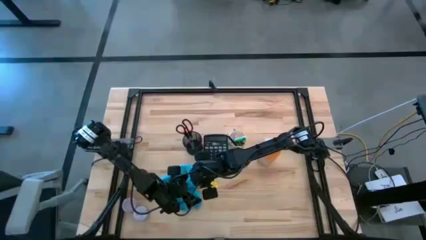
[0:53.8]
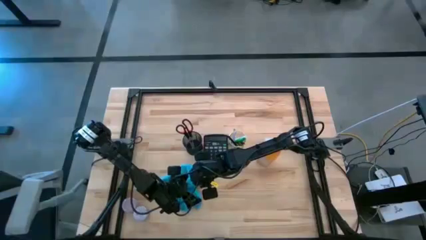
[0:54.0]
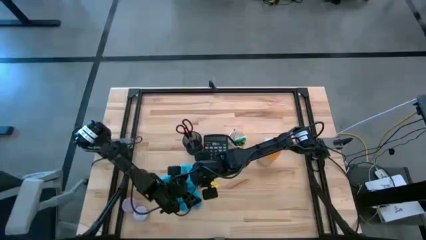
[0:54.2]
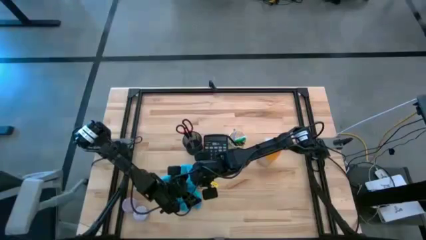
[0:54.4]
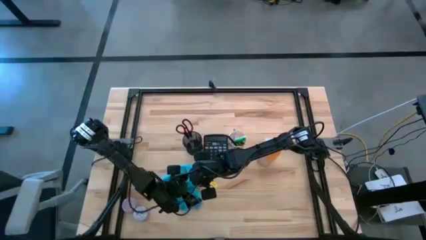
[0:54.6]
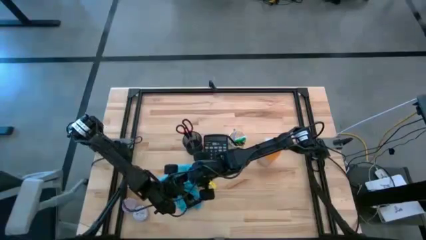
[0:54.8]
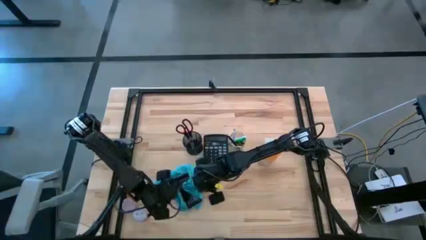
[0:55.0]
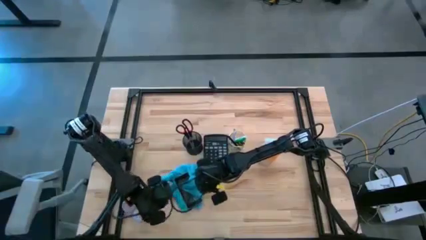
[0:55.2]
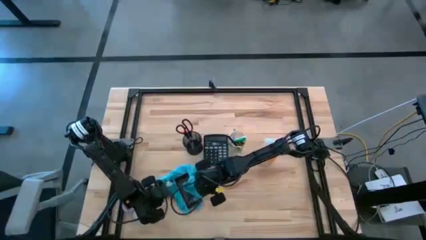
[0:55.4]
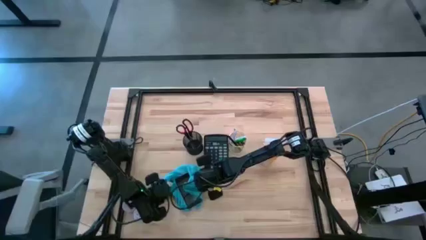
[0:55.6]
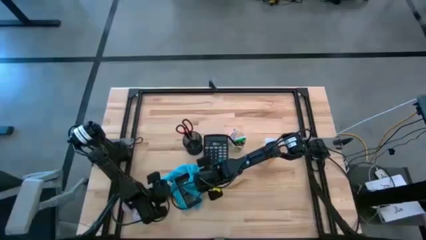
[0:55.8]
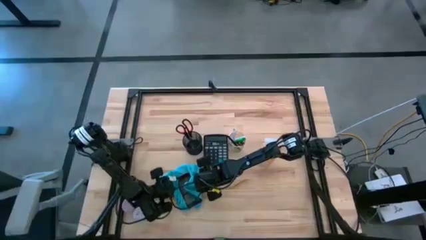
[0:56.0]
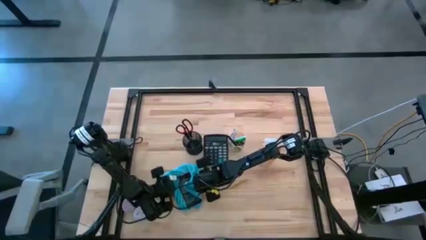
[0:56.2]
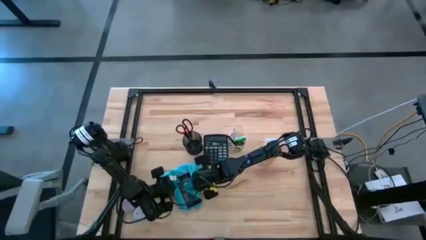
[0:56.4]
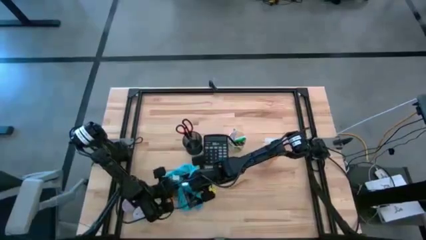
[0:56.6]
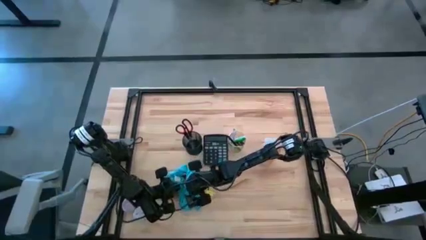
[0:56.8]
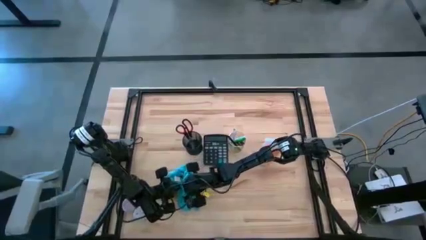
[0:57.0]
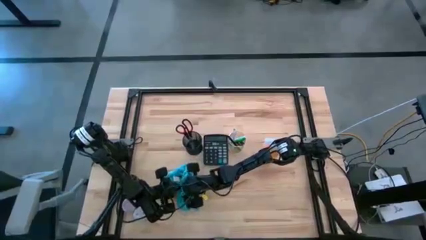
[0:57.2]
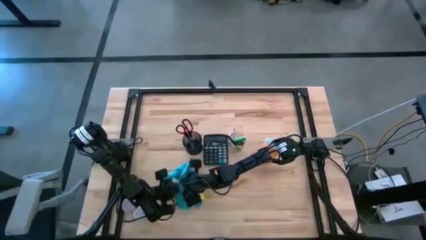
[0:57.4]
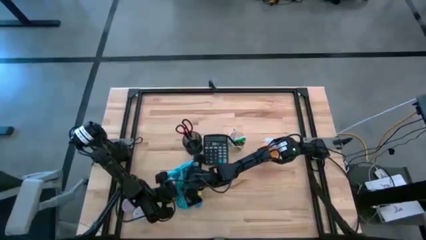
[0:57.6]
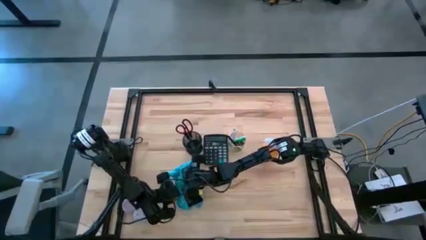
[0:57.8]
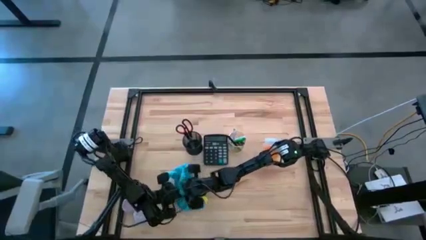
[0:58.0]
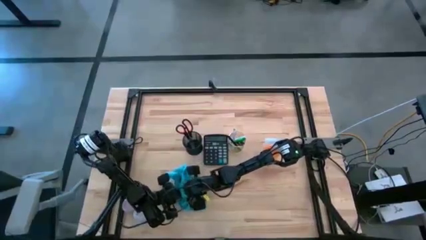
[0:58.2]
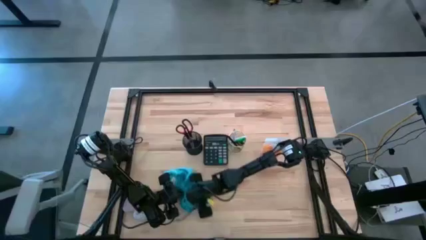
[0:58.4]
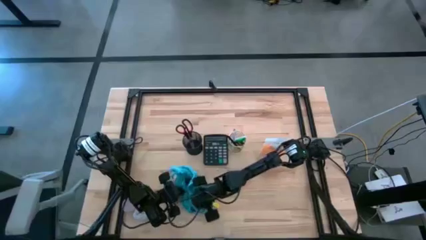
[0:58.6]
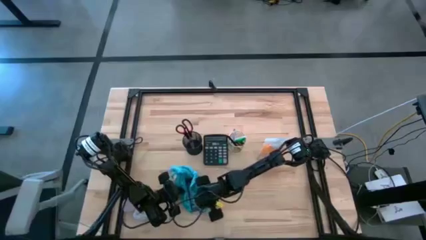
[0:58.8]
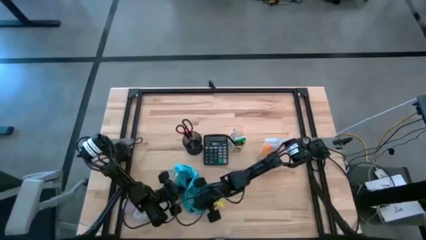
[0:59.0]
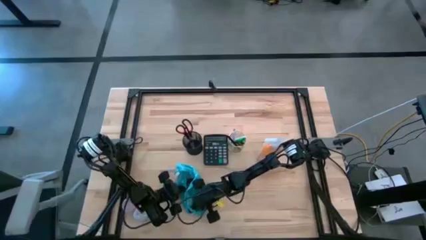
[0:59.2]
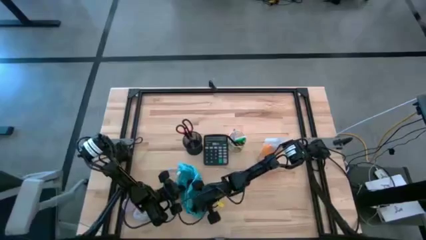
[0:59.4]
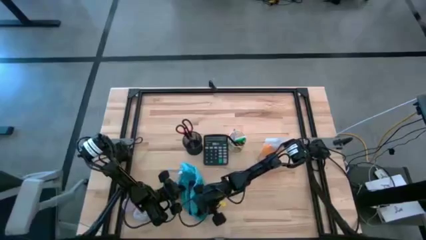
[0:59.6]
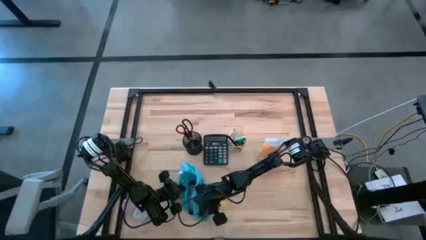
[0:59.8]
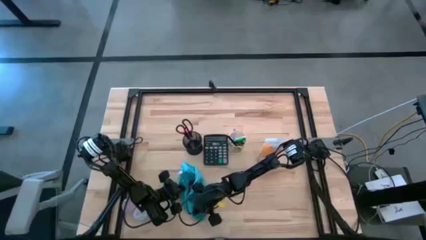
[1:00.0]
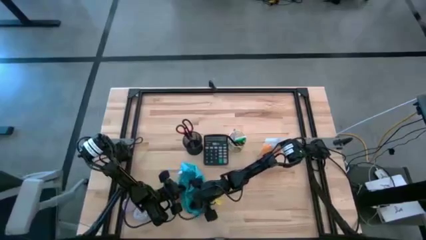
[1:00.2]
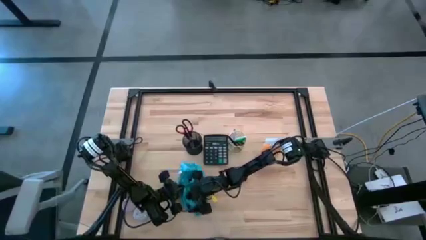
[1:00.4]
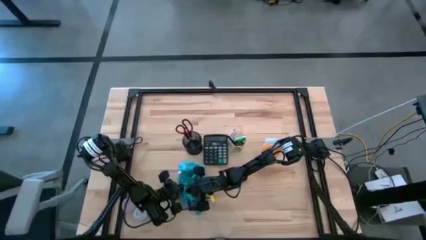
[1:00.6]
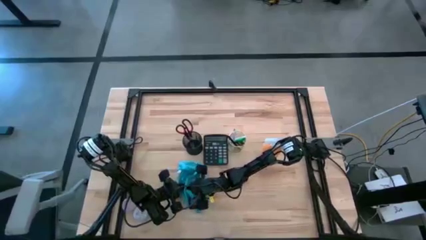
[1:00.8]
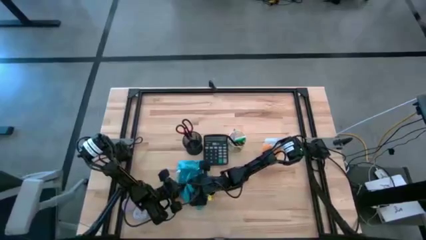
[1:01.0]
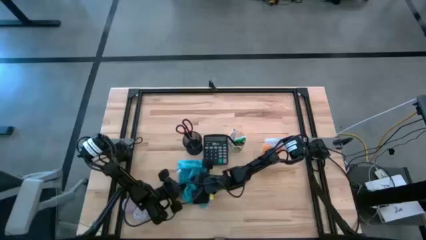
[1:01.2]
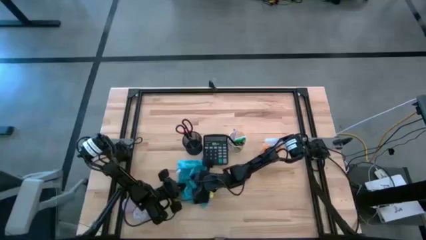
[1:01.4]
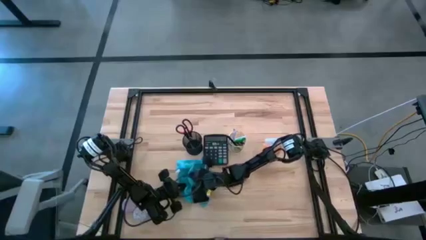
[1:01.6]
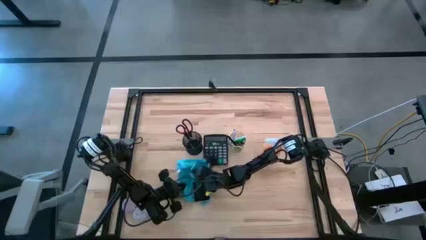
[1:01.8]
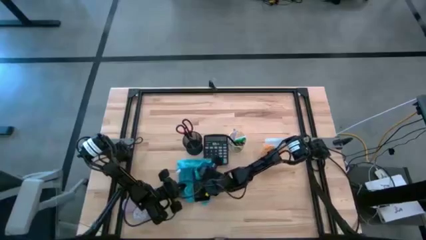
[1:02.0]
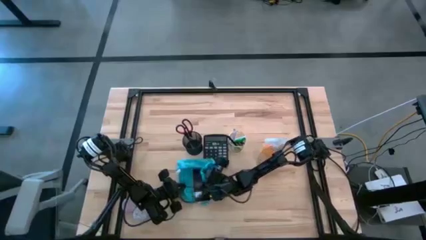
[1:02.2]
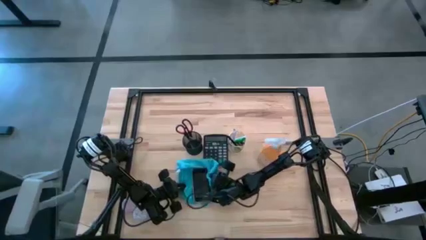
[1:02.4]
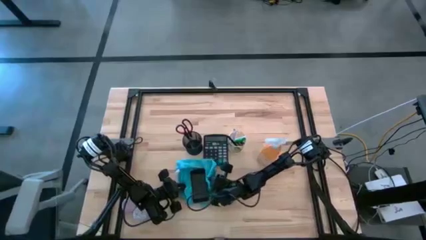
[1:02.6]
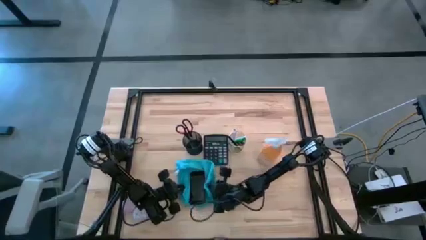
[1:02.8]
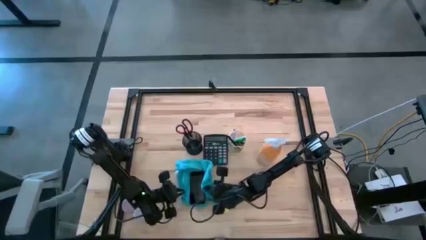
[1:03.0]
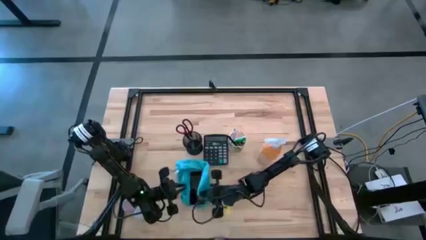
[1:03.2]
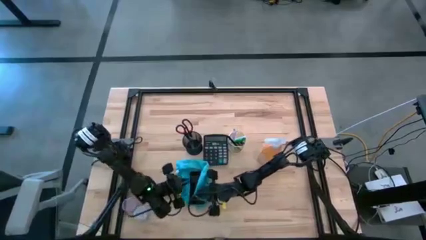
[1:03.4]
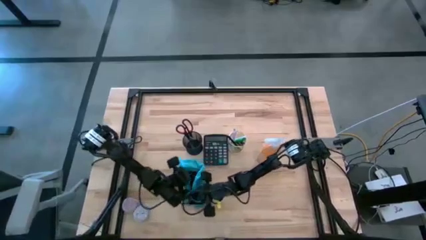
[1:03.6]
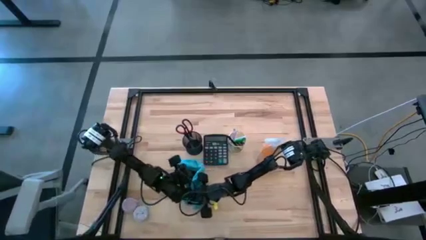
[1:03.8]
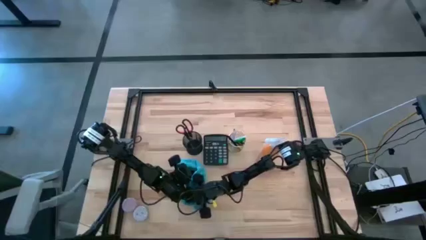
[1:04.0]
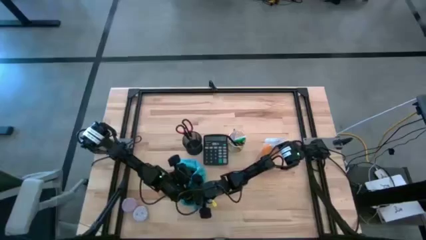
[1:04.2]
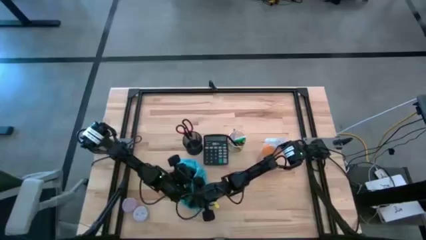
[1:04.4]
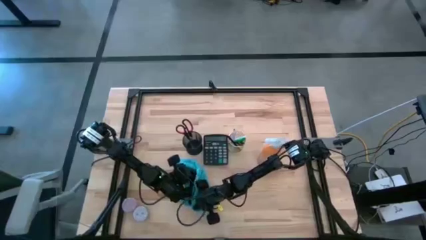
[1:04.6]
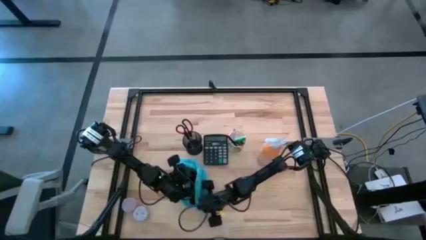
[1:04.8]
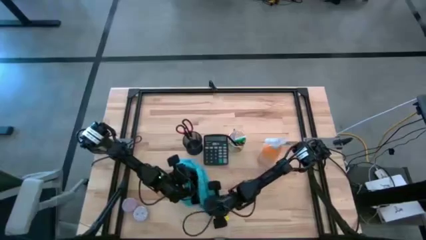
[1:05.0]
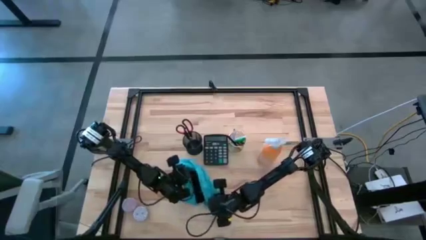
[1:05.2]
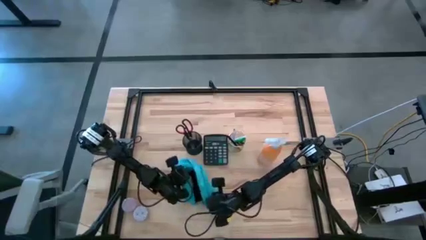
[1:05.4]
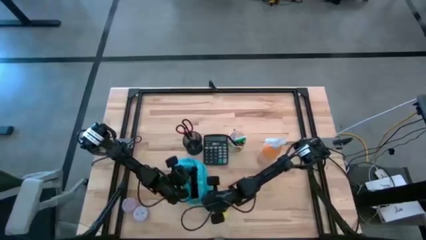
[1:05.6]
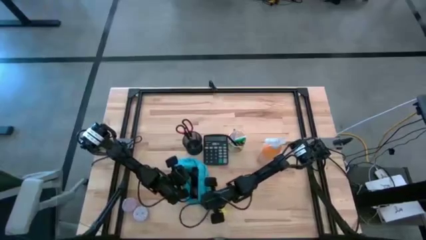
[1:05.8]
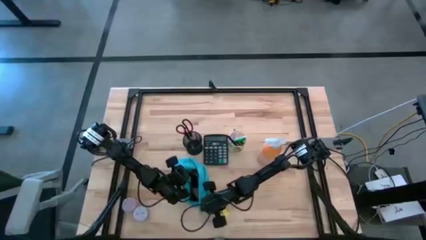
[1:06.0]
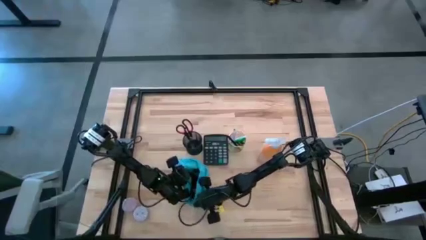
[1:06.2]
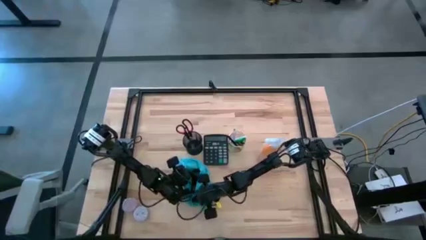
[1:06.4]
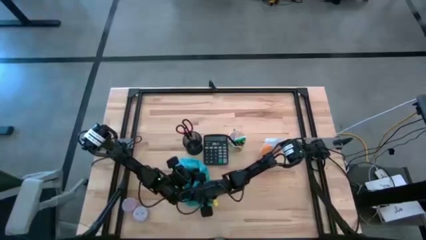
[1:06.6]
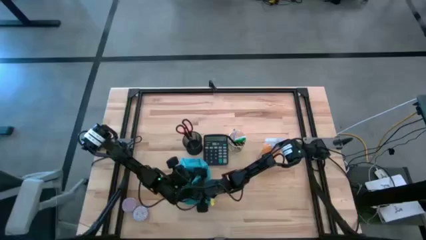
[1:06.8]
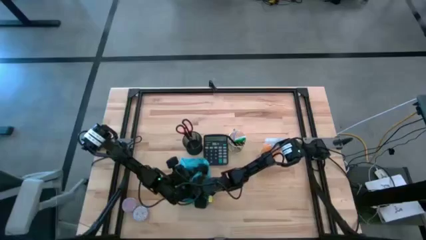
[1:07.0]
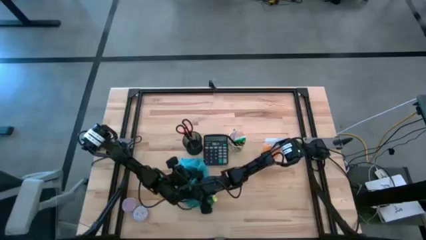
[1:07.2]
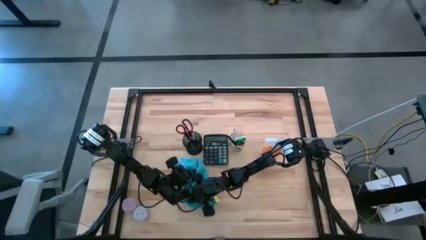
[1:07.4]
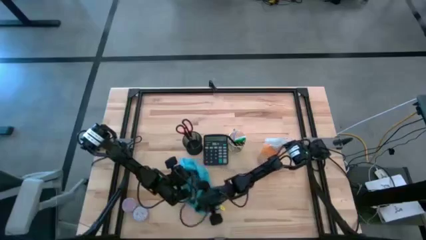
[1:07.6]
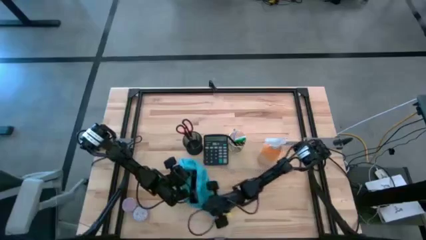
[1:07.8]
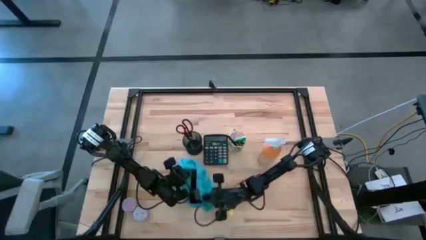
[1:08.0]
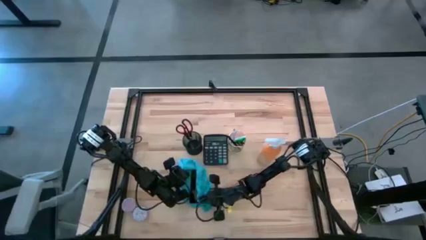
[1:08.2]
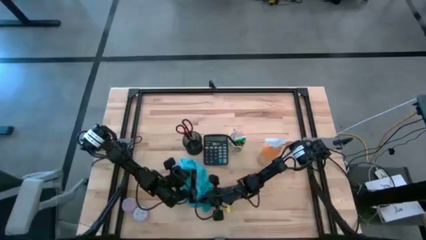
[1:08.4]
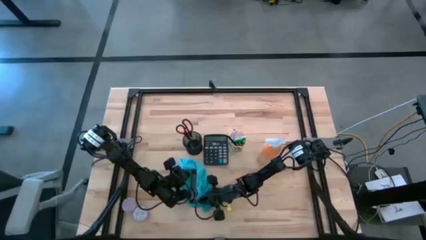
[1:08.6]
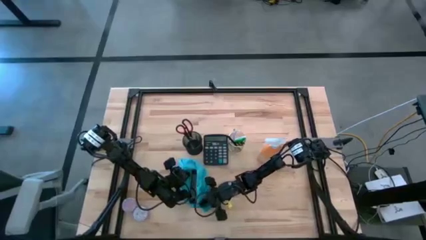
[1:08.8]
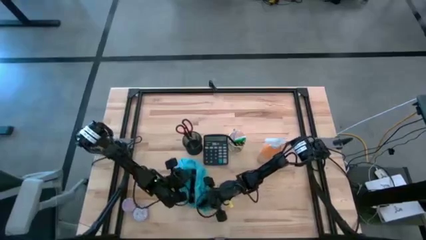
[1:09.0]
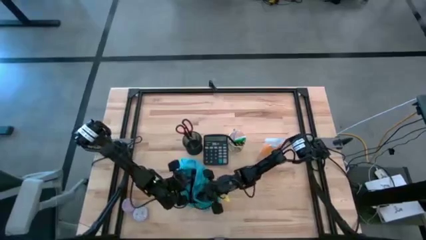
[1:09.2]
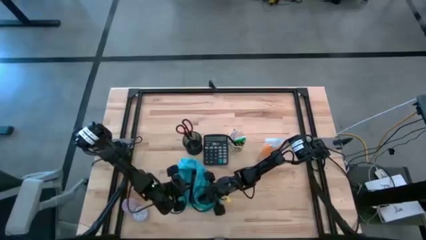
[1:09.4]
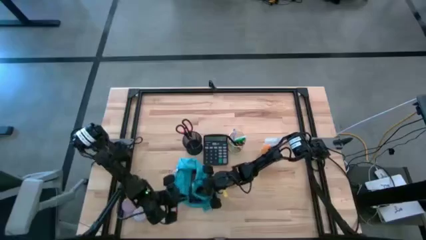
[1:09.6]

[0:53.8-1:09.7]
Task: Apply microfiber cloth
Wipe the front and back of the cellphone with the blue microfiber cloth
